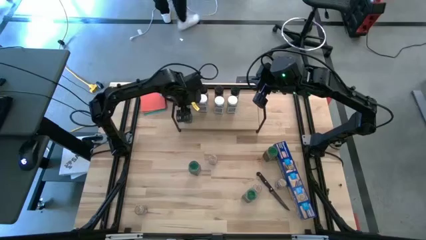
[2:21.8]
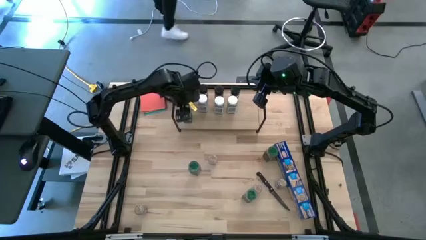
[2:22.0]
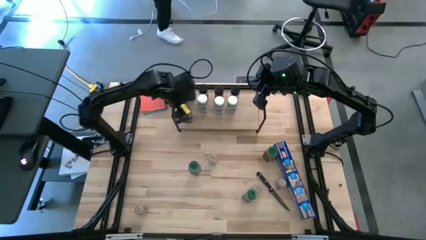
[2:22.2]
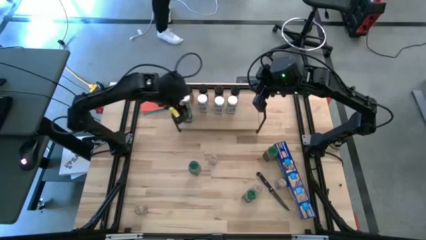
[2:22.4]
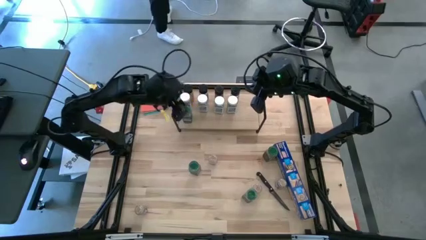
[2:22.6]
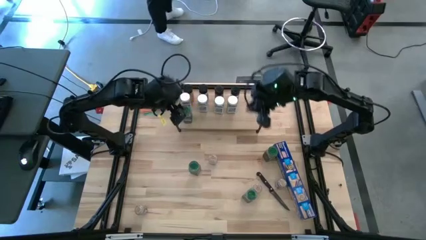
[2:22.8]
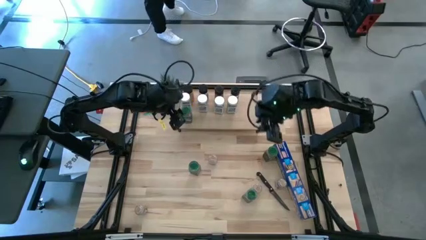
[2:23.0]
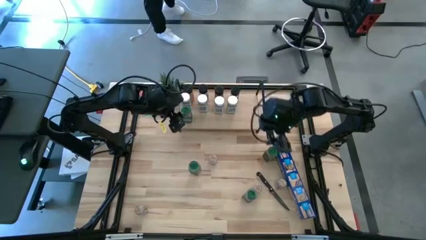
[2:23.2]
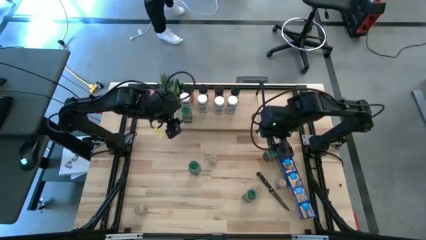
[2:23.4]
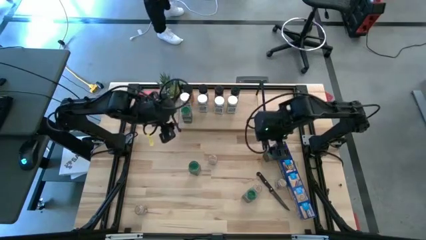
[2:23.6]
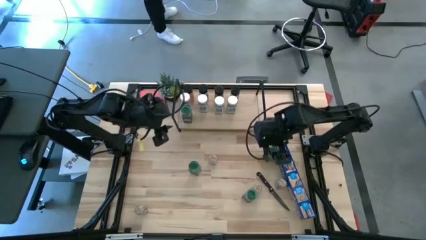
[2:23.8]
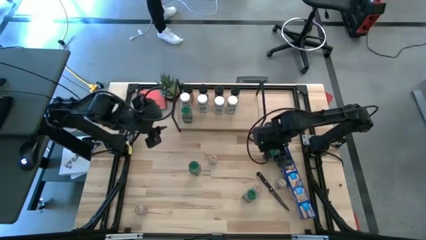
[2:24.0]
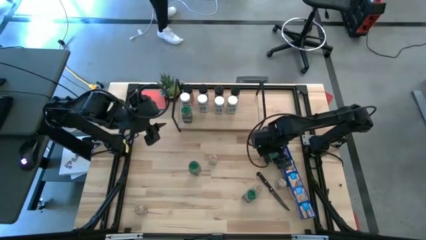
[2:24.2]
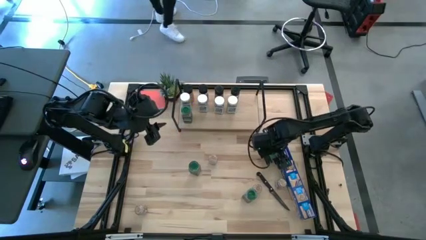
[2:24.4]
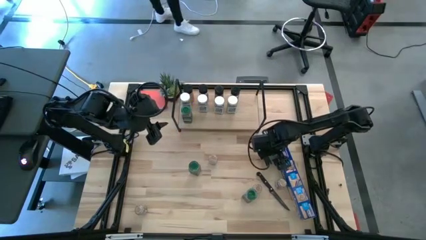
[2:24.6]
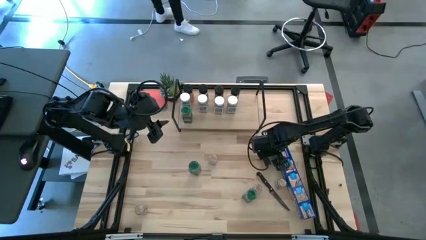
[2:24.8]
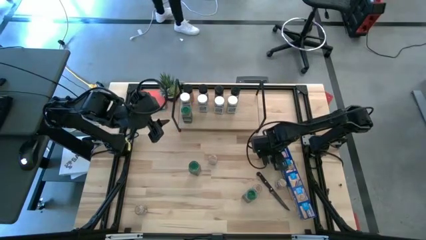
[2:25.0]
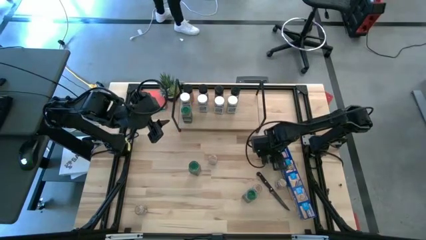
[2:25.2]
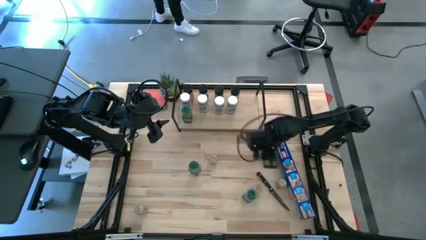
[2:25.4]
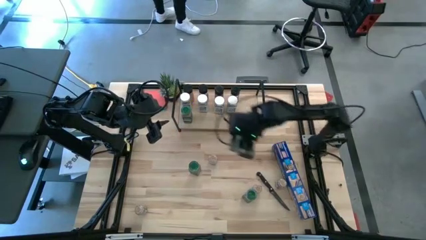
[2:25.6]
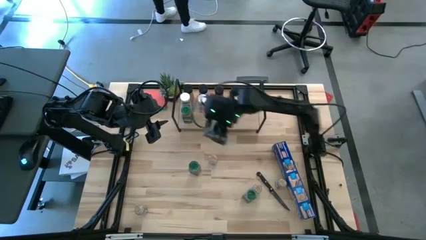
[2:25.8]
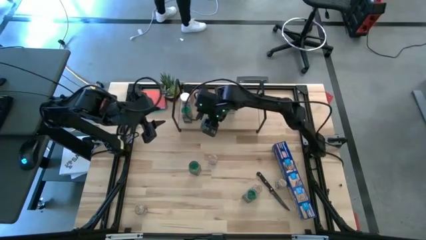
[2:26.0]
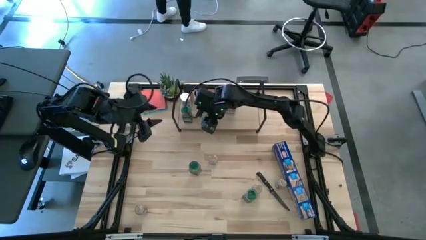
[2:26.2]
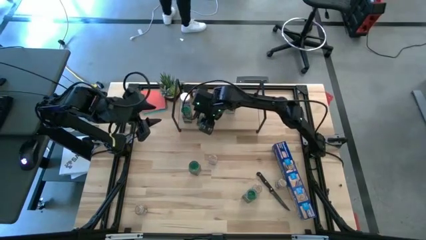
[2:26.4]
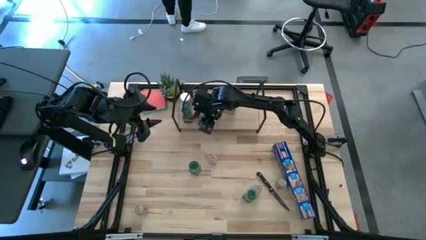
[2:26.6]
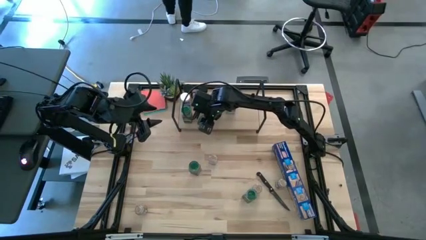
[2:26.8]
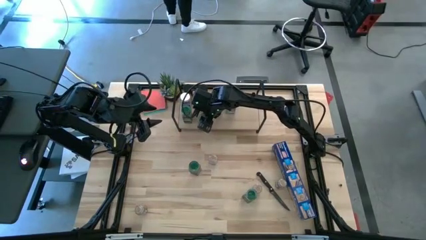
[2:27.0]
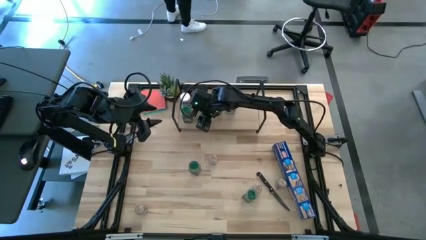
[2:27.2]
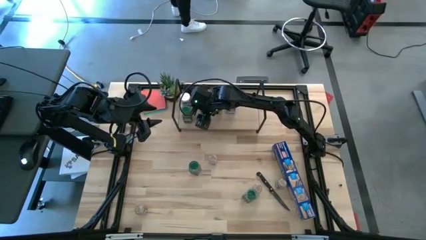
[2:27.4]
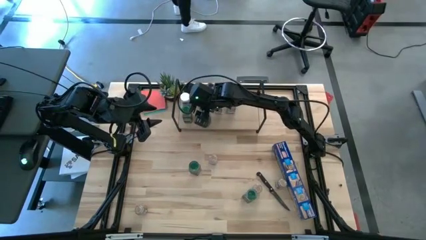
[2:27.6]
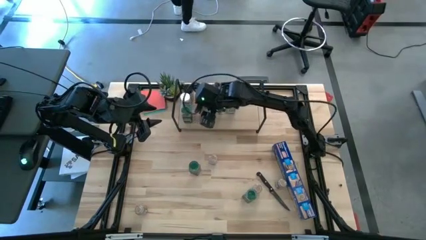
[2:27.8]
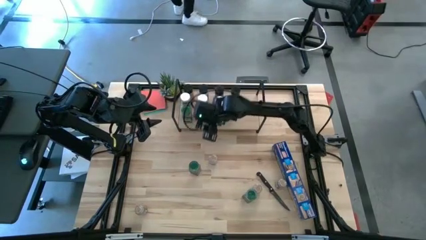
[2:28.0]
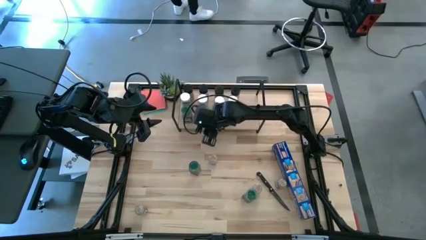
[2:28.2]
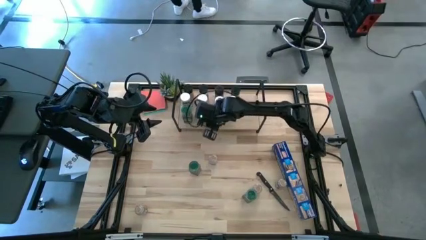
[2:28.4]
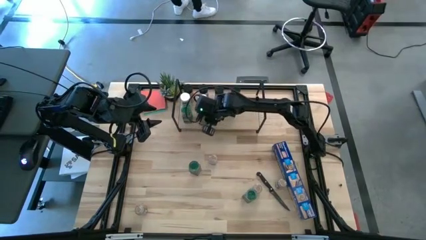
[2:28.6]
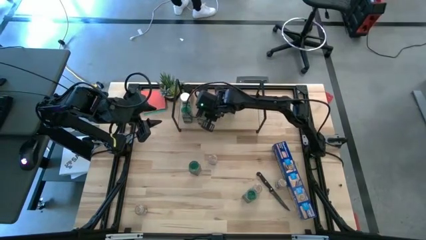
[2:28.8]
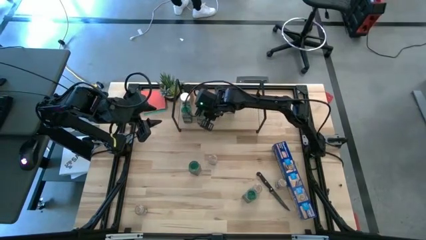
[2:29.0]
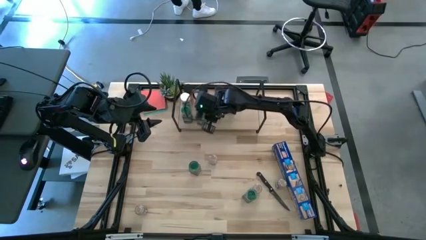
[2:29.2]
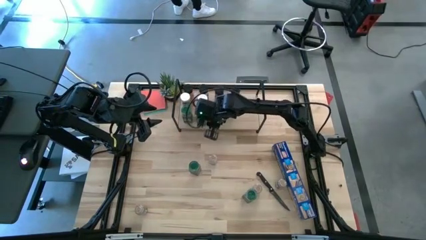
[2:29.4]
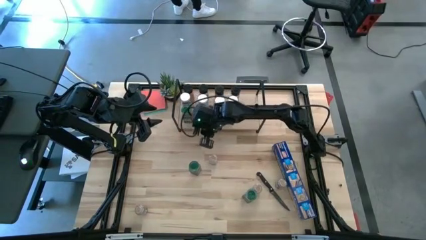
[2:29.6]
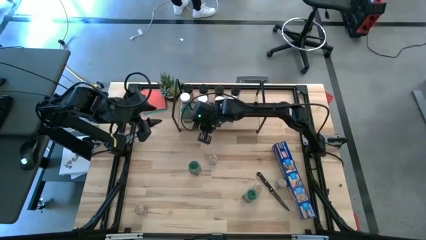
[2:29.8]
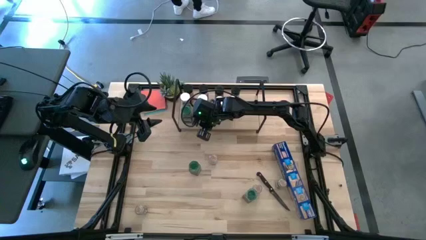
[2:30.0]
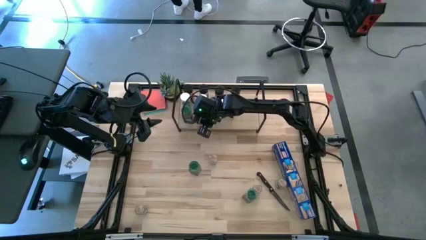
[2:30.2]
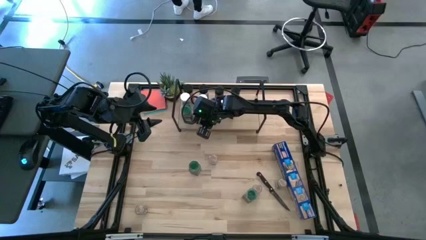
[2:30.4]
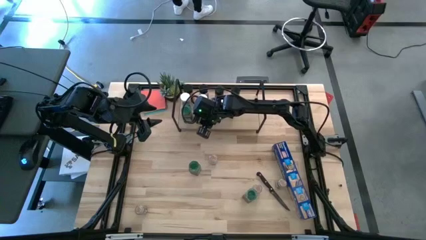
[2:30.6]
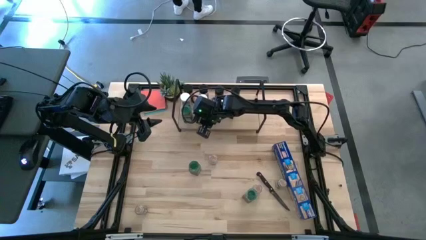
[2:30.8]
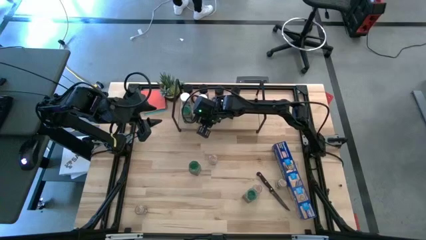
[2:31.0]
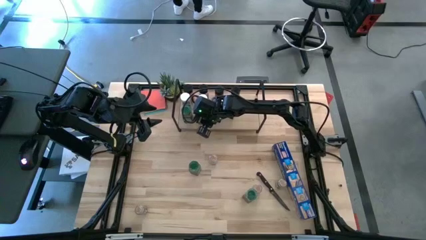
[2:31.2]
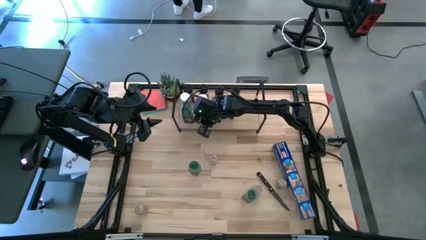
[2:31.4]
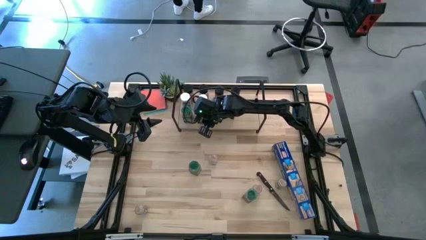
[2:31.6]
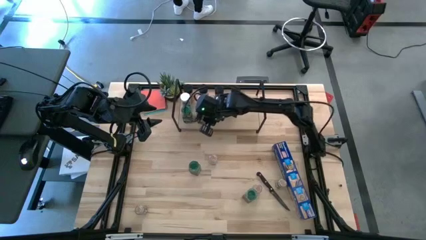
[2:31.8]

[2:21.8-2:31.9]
Task: Shelf spices
Put the green seasoning bottle on the shelf aligned with the white seasoning bottle

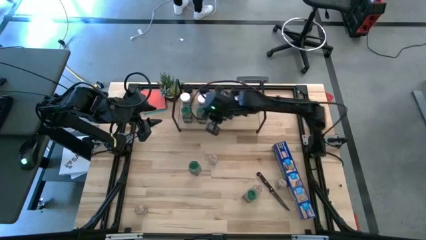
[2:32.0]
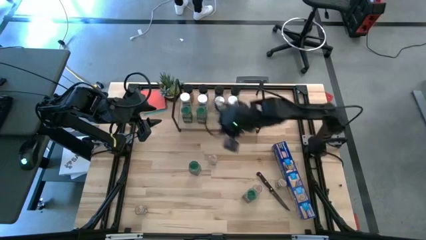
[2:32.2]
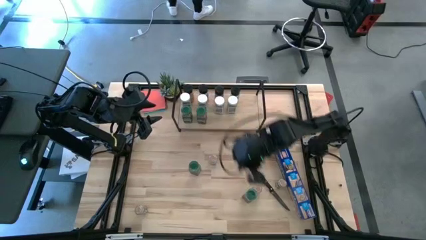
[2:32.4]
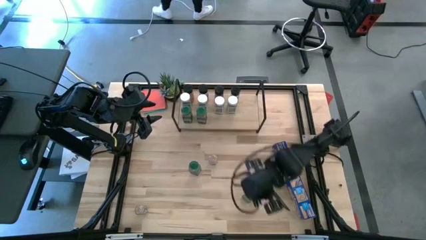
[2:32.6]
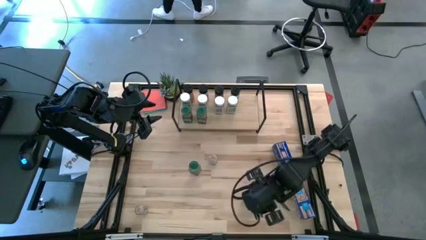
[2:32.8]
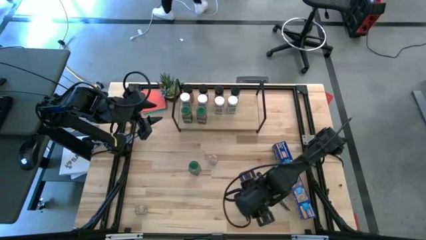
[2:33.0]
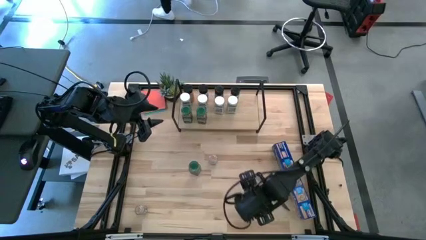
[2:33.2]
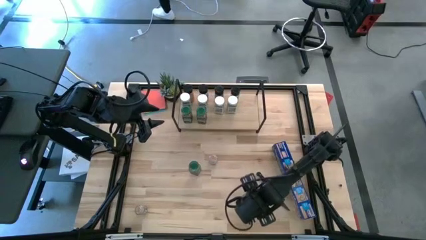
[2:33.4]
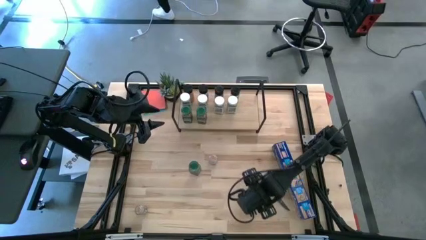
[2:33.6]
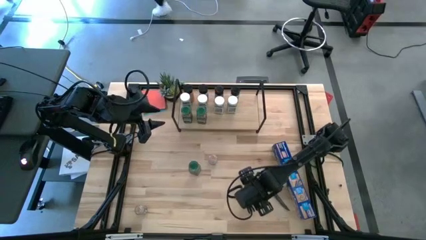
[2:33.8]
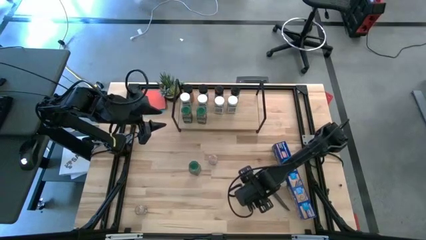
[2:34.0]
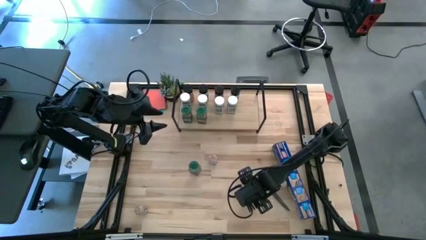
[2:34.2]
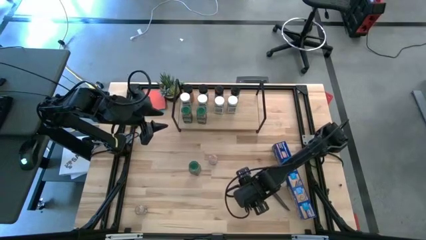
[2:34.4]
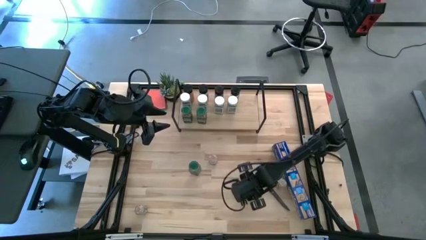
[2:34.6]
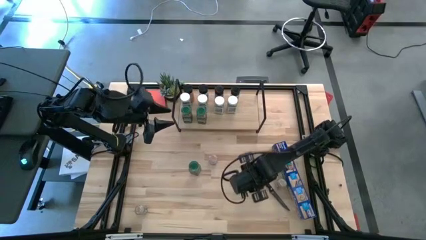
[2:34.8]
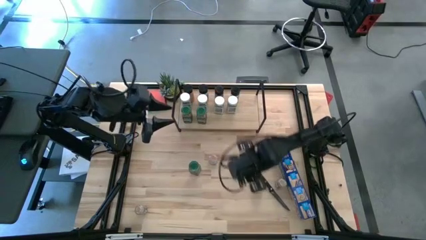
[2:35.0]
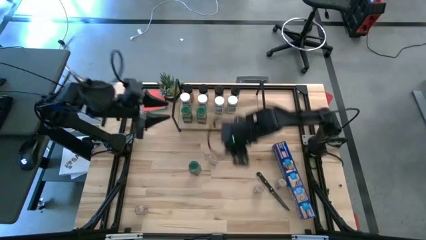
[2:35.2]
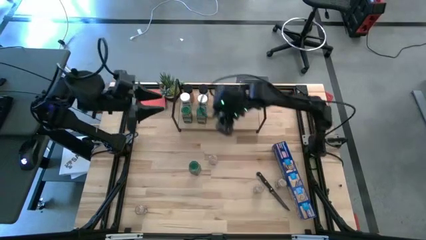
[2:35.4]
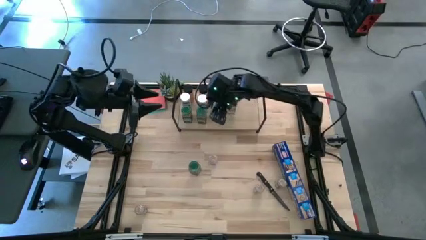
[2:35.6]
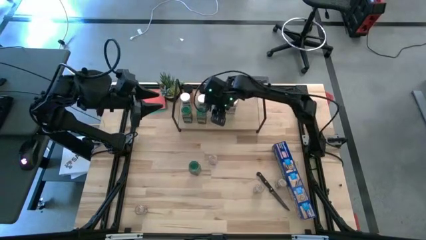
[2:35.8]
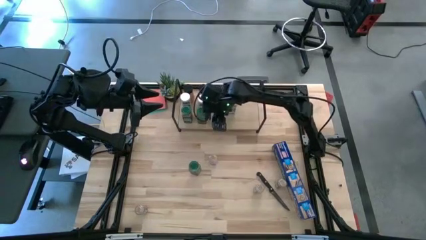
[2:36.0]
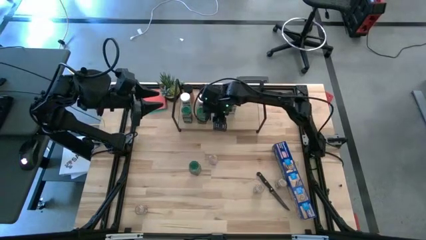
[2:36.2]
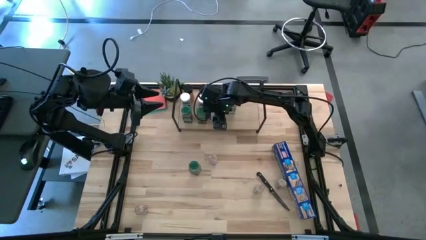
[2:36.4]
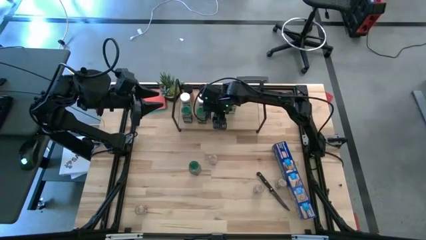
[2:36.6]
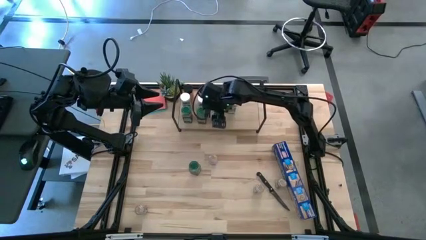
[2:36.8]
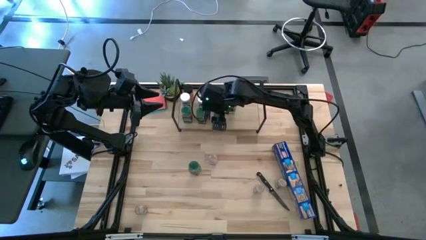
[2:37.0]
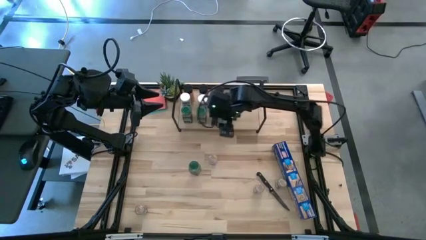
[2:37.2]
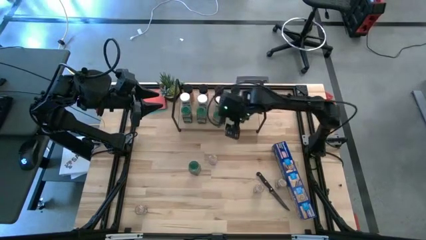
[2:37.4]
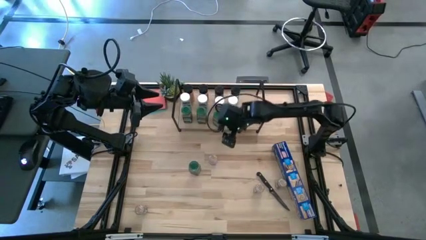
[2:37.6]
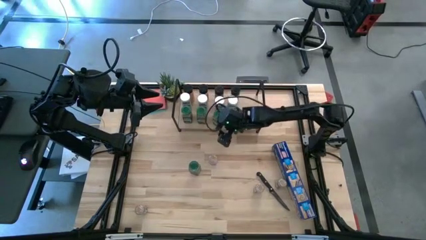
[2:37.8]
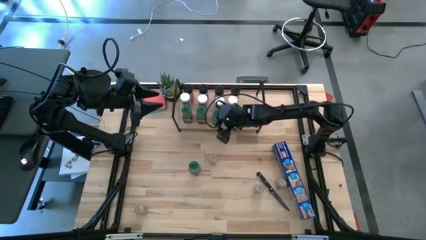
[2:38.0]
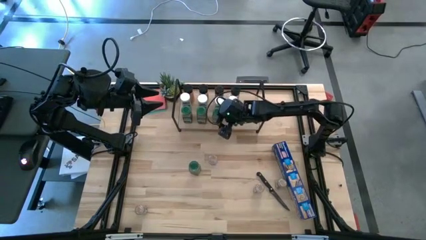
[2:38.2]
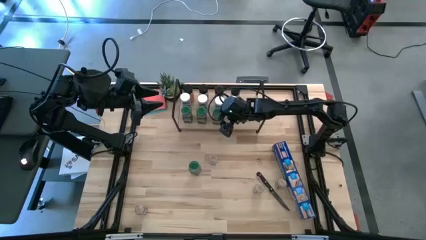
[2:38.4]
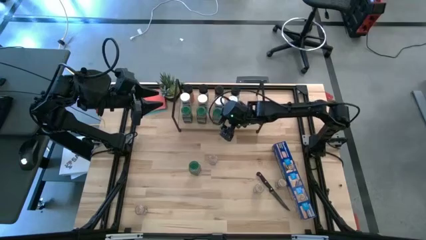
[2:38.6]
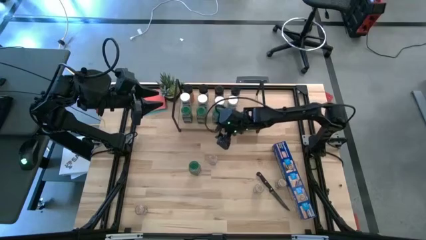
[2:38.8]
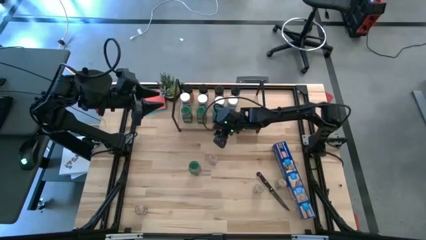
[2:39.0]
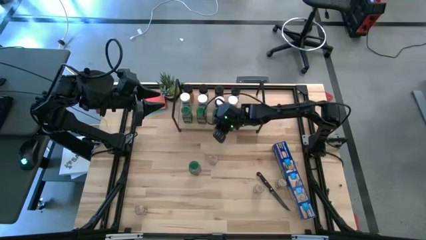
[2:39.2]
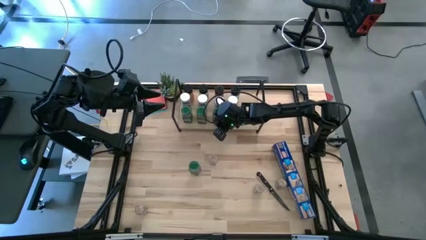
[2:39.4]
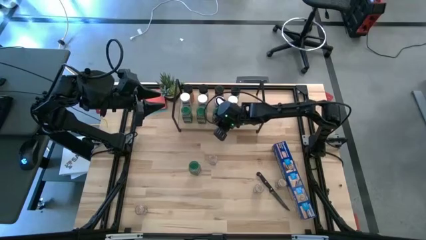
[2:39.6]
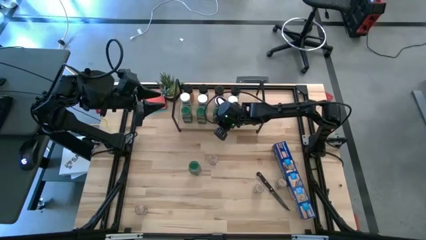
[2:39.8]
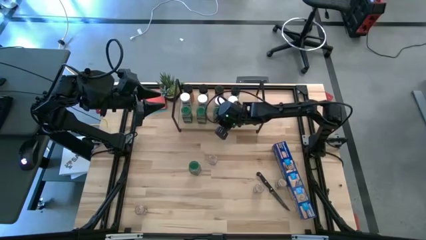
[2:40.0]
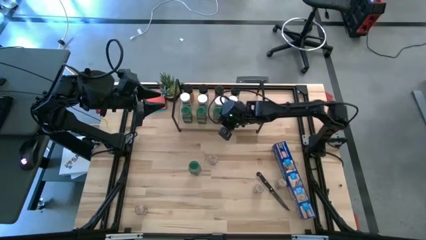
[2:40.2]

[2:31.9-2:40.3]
Put the green seasoning bottle on the shelf aligned with the white seasoning bottle
